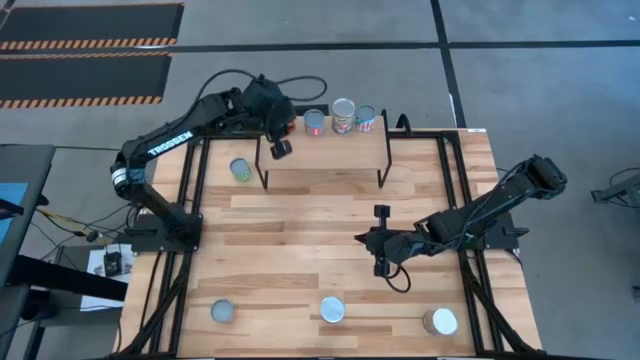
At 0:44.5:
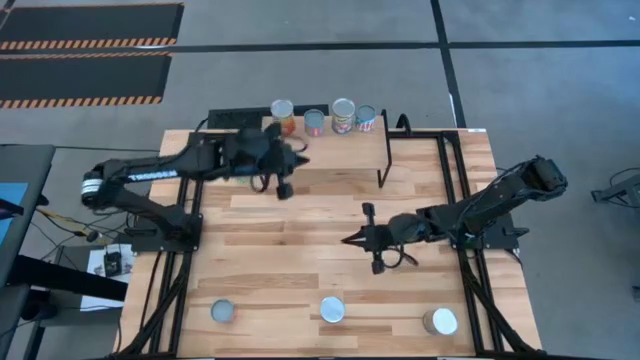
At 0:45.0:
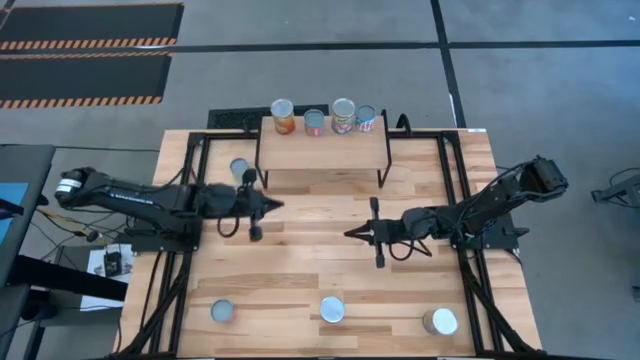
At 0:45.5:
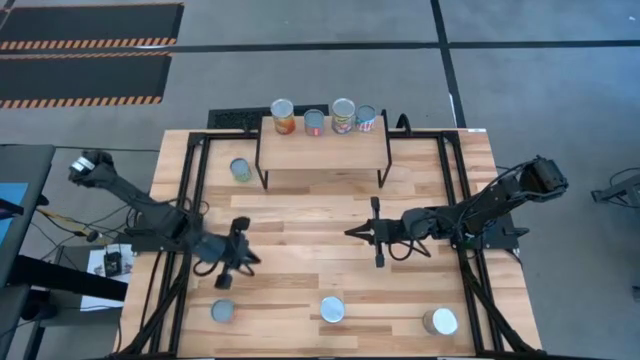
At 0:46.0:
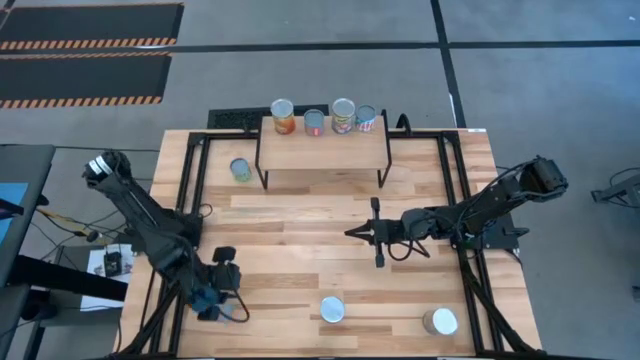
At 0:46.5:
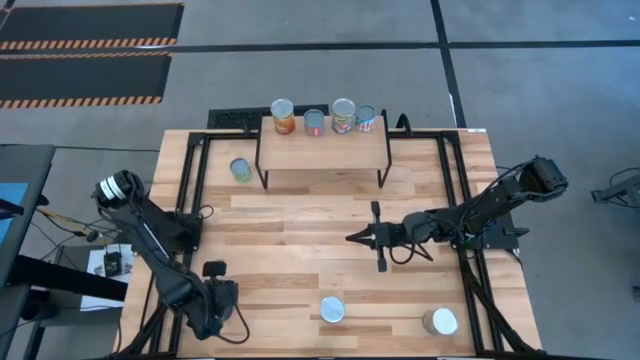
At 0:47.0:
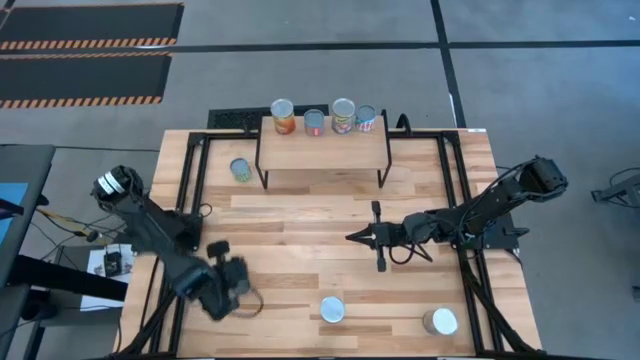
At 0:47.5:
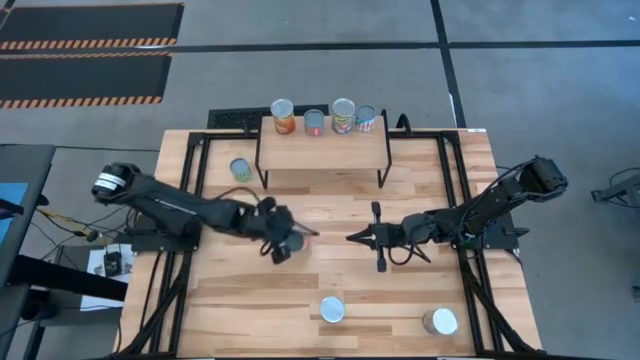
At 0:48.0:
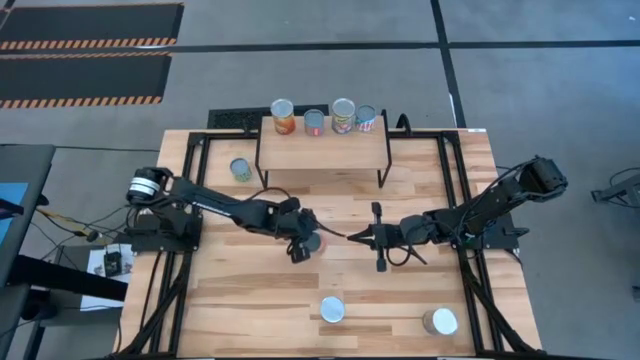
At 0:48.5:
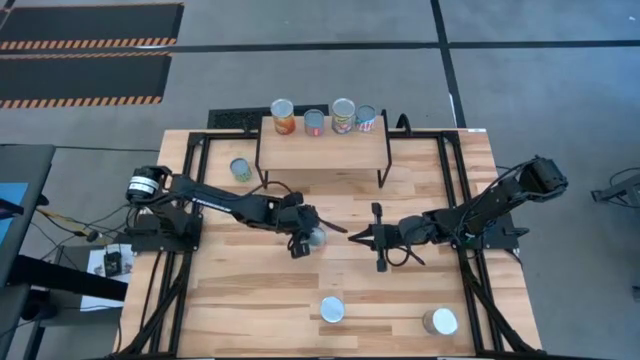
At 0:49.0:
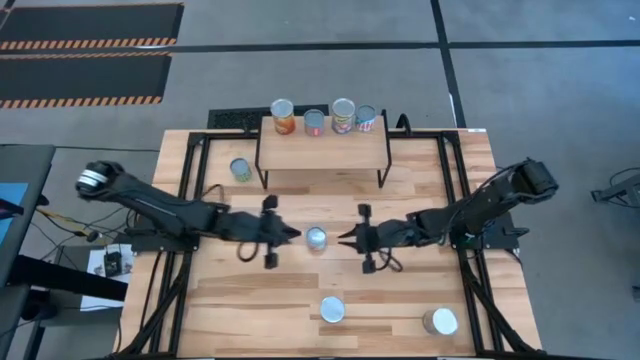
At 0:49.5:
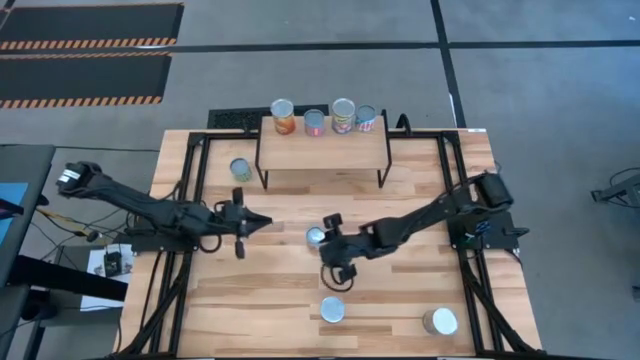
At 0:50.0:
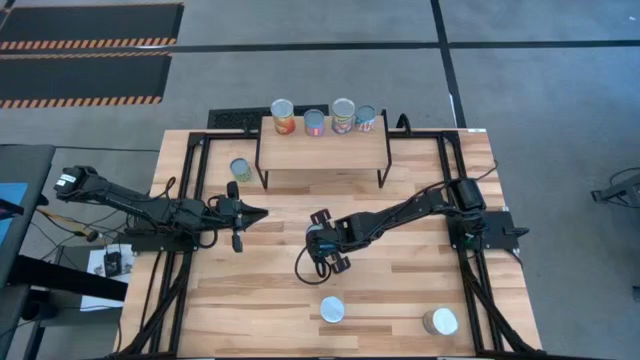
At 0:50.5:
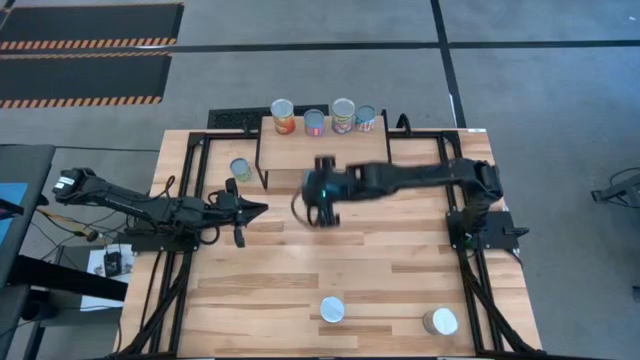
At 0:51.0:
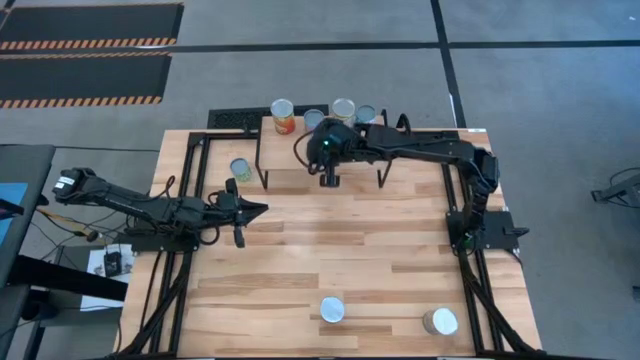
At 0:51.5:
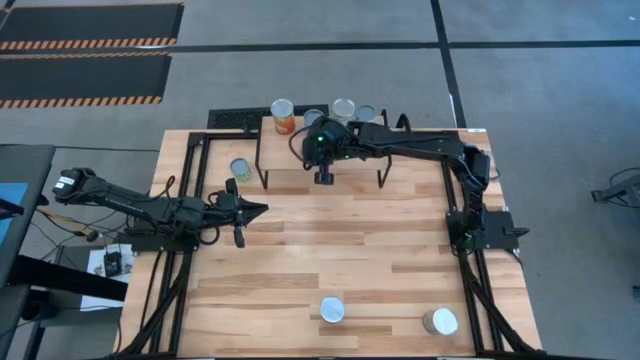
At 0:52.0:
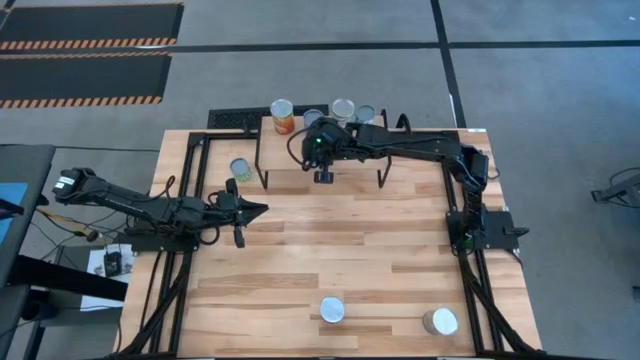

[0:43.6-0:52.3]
Task: Pick and place cans onto a shelf
Put the canned orange on the shelf

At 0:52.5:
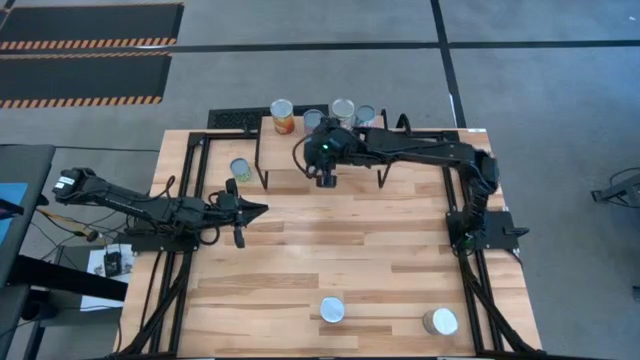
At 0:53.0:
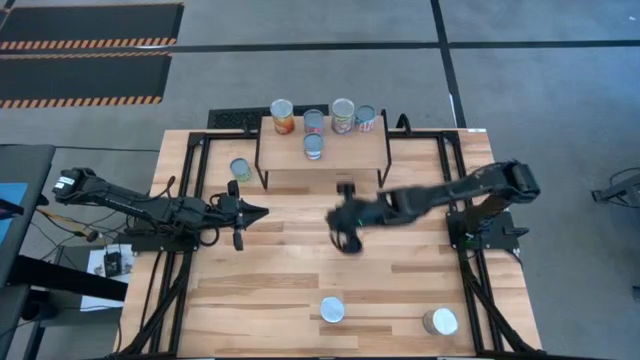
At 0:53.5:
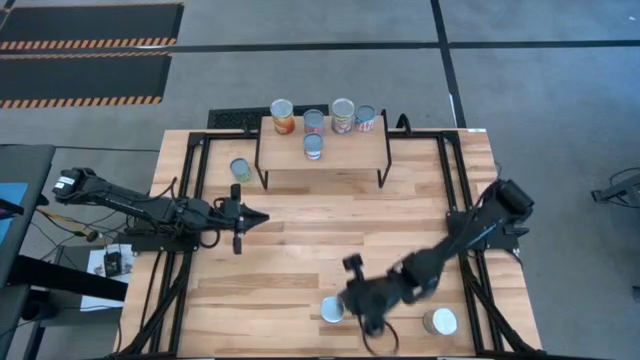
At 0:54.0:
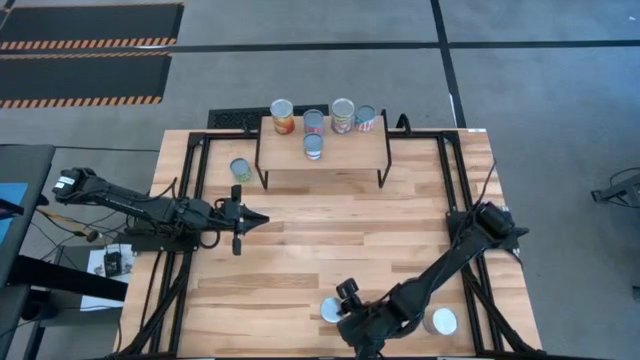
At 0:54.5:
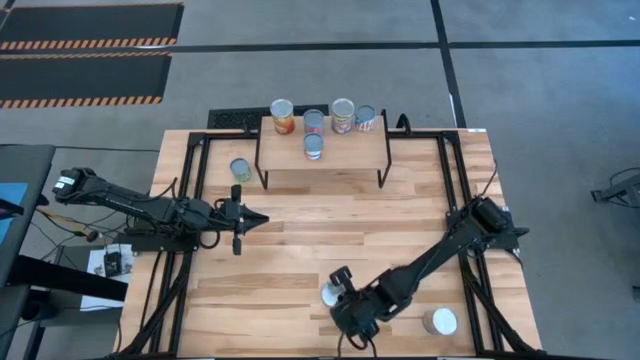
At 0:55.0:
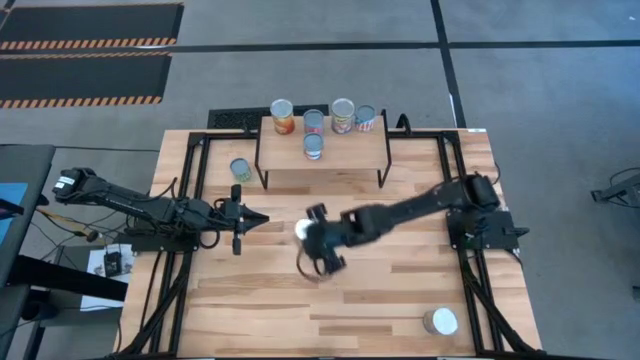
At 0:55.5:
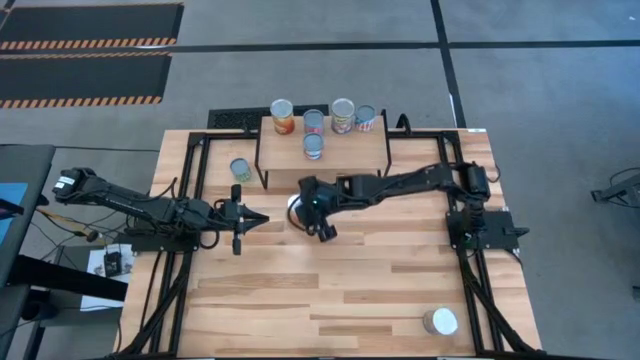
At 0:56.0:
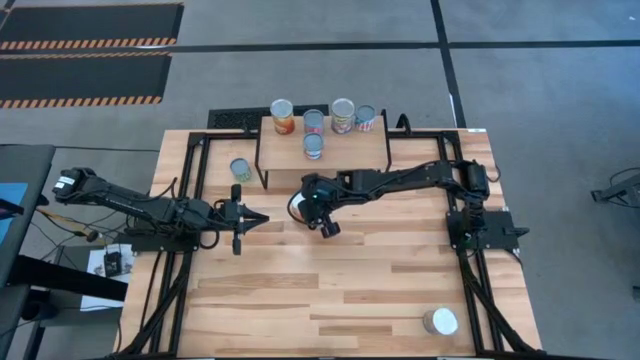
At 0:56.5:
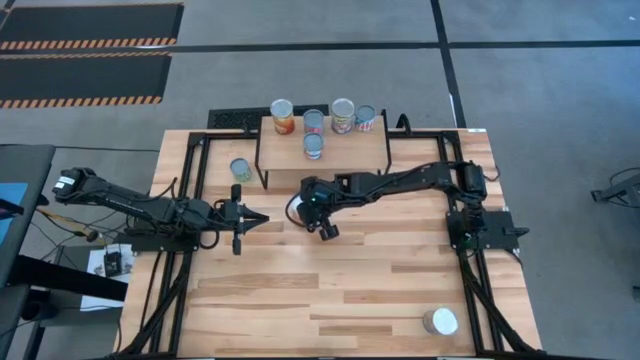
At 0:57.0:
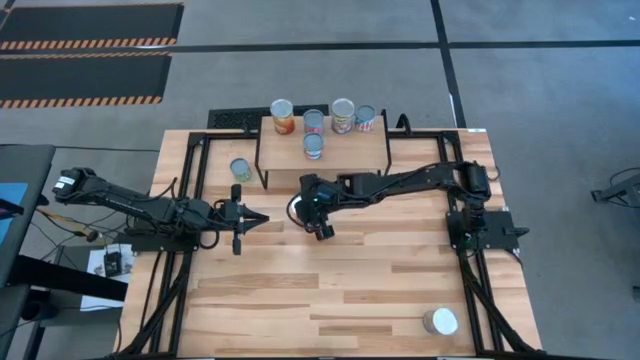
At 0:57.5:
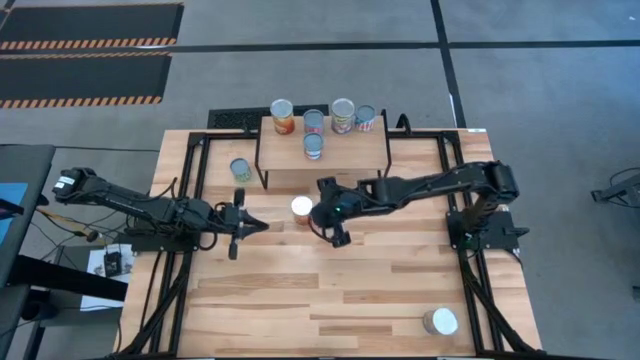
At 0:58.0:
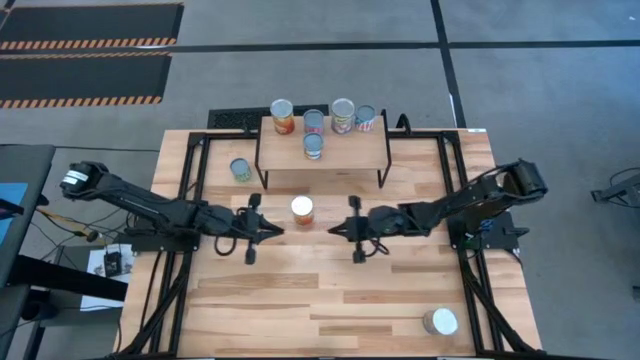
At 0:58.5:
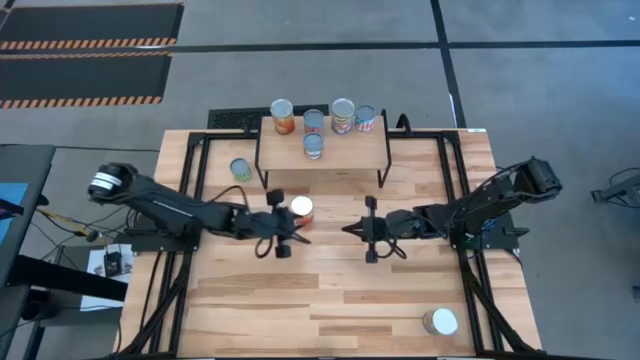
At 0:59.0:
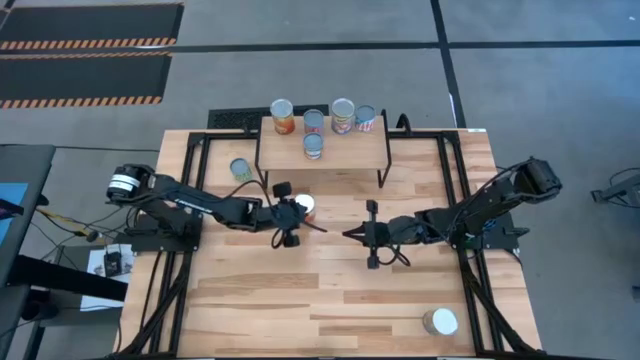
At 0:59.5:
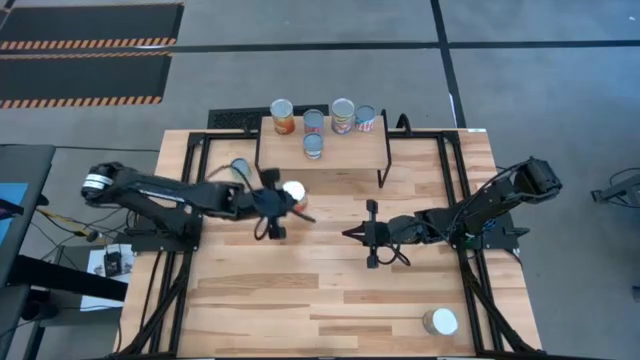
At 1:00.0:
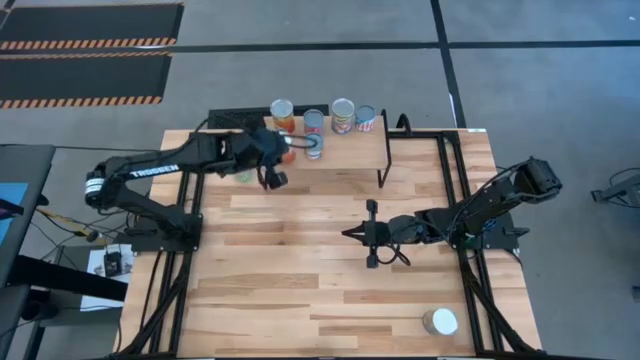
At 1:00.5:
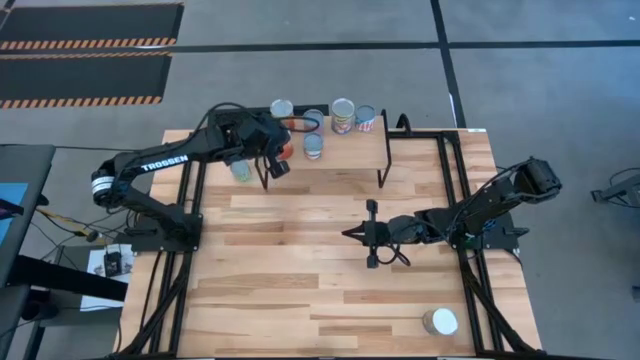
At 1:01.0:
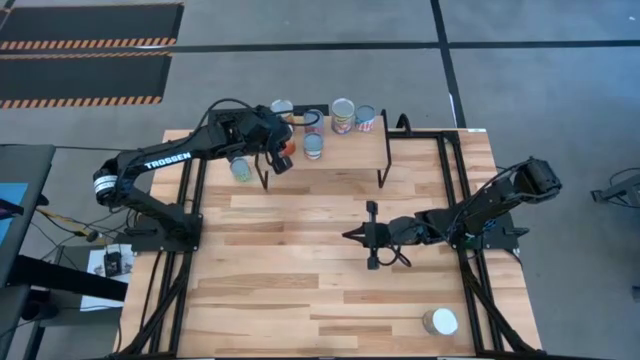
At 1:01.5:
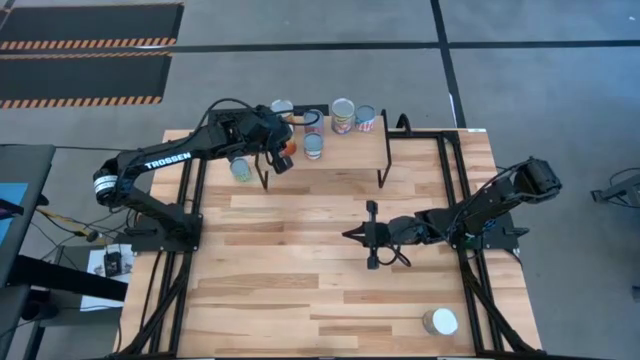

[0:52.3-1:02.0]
Put the big canned corn on the shelf

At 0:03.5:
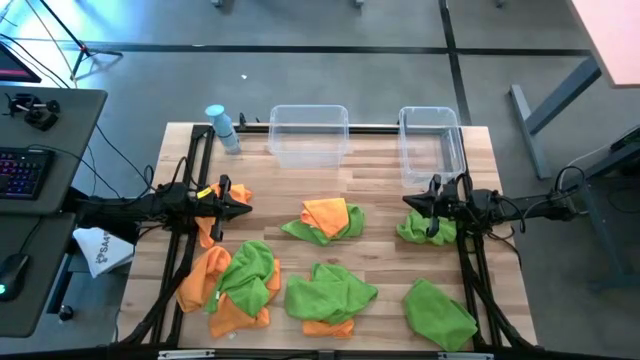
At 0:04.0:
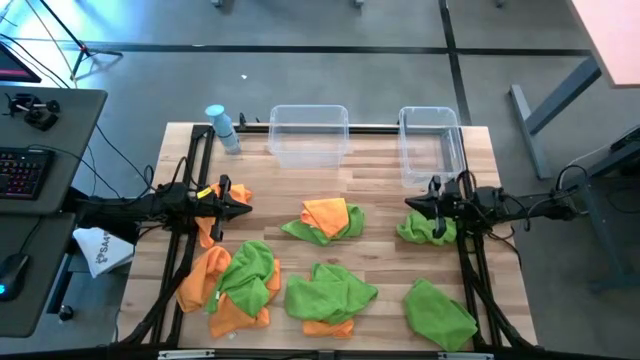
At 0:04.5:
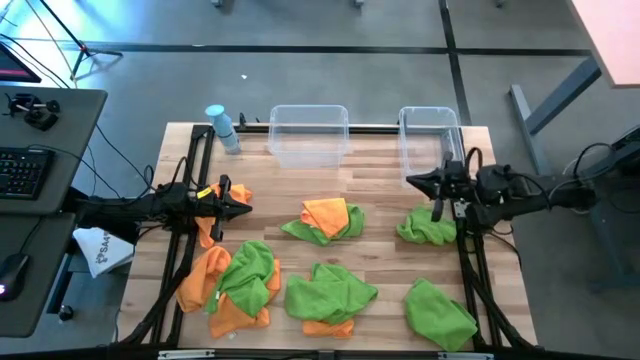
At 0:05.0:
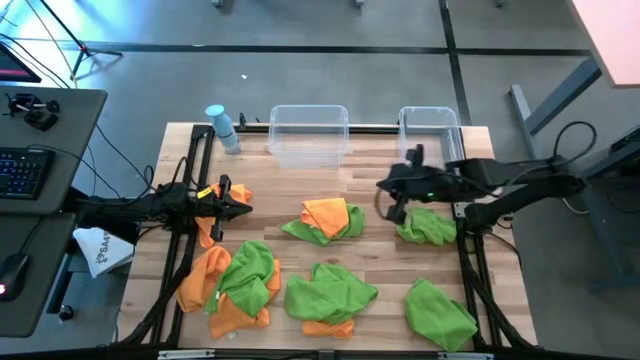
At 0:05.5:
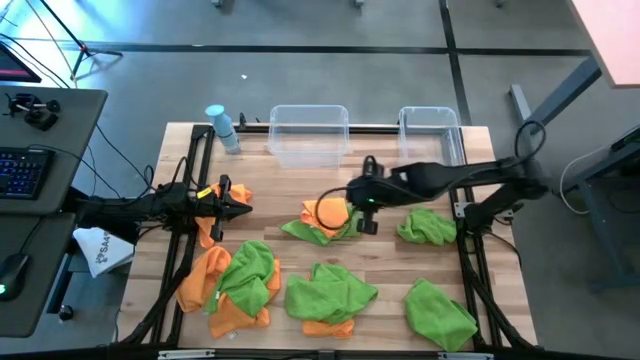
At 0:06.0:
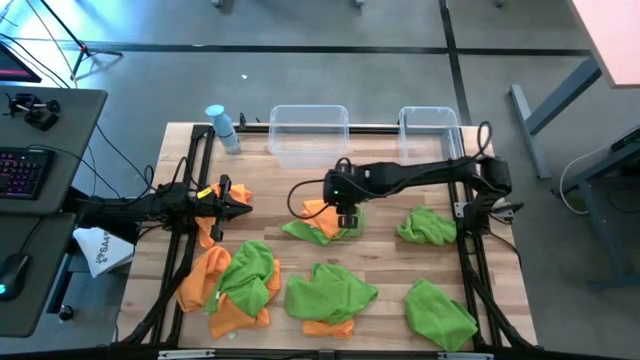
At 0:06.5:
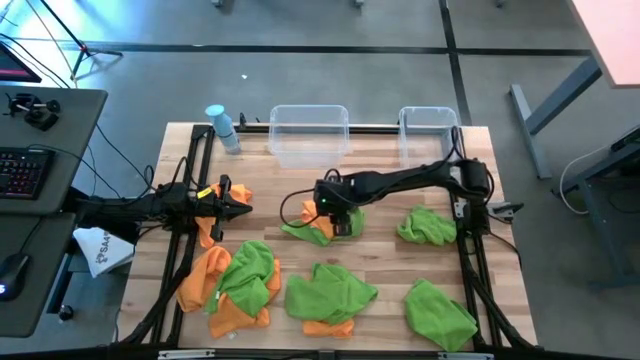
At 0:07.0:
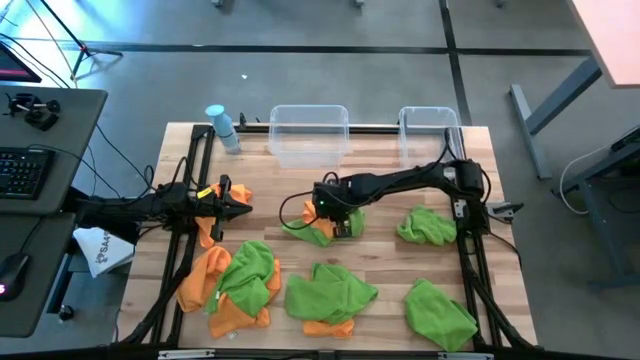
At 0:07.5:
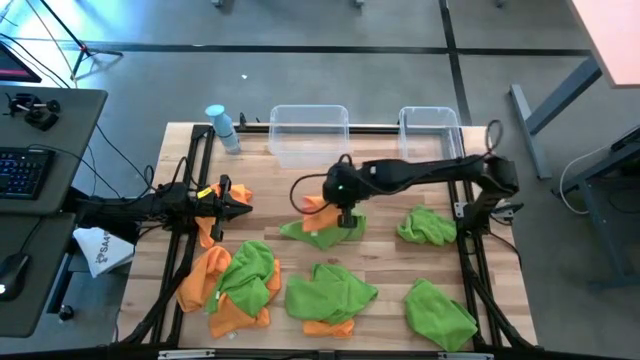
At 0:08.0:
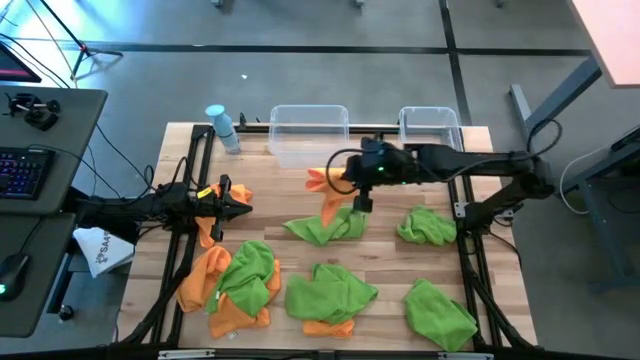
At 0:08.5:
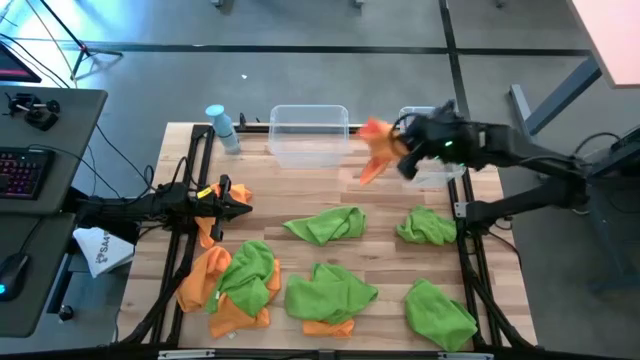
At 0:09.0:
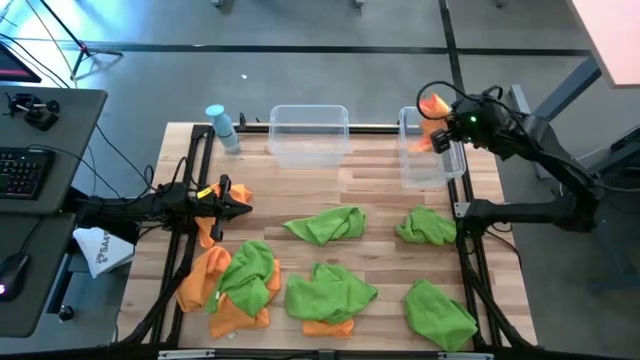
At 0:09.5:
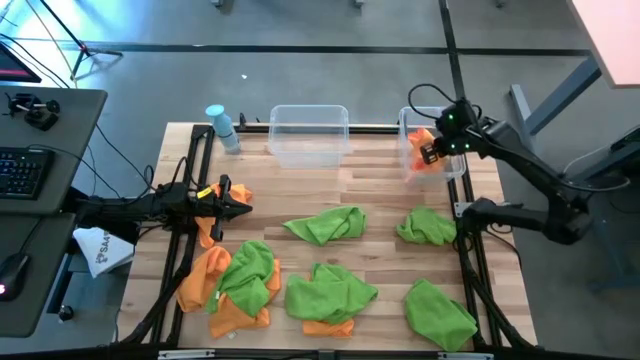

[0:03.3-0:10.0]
Task: Sort microfiber towel by color & place in baskets
Put the orange towel into the right transparent bin
